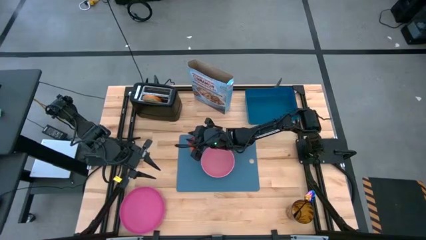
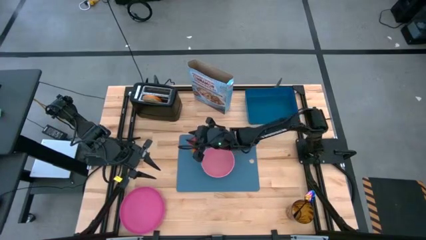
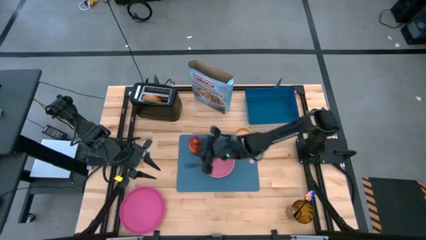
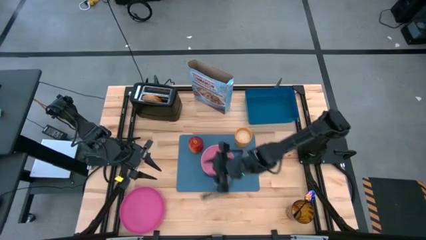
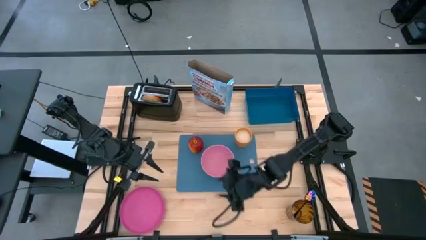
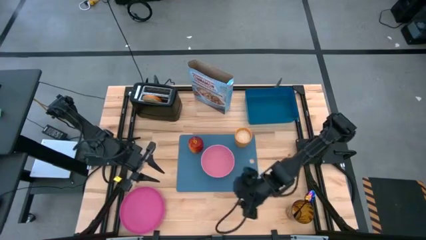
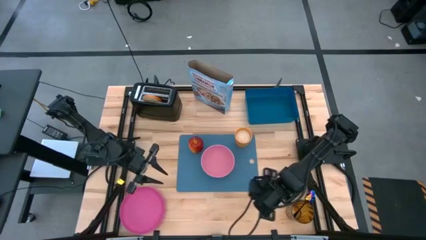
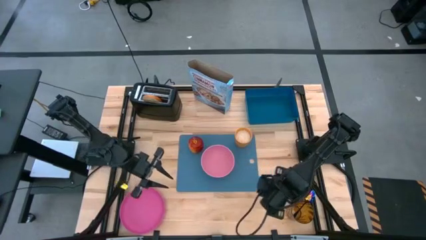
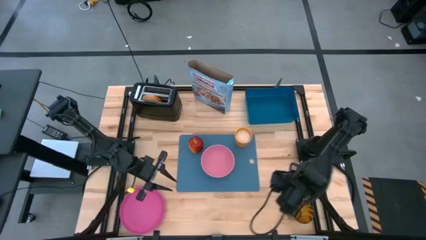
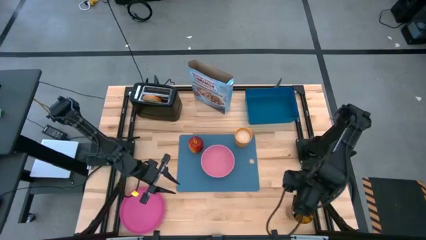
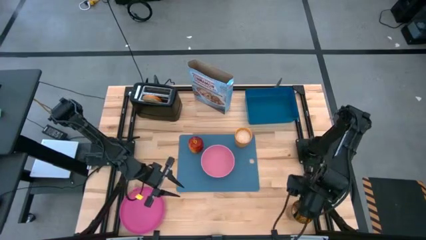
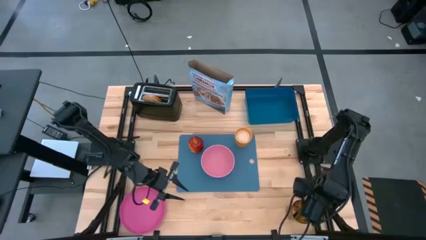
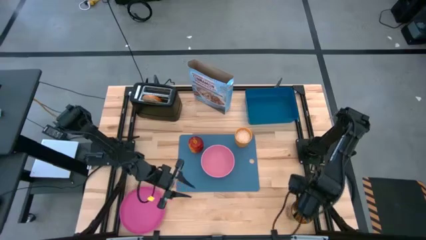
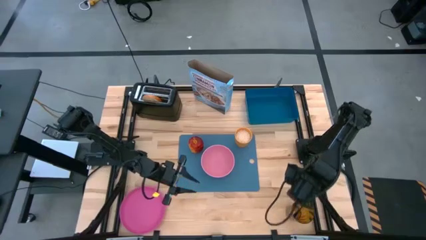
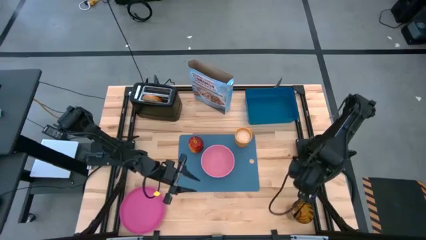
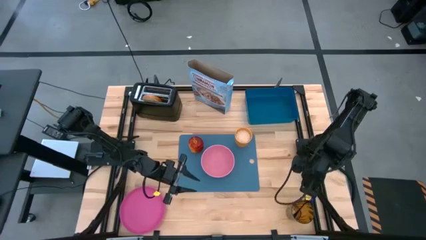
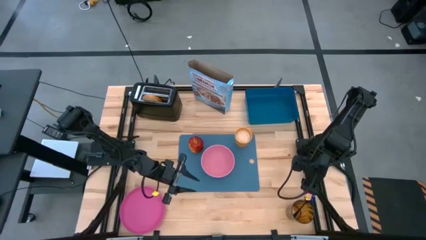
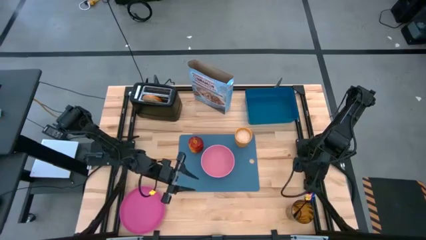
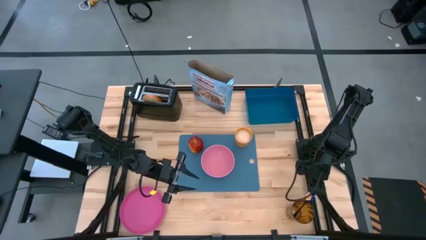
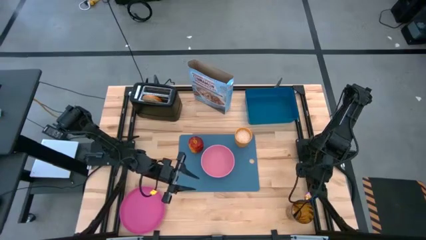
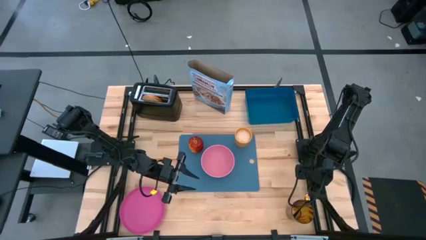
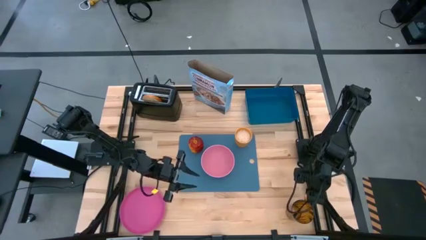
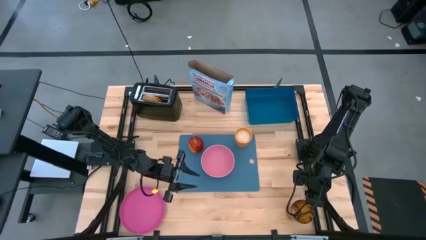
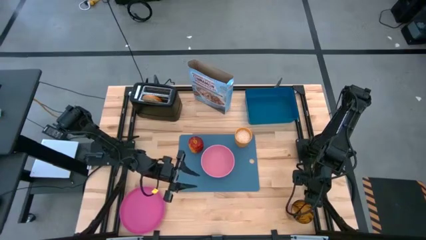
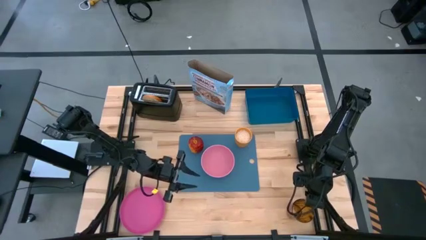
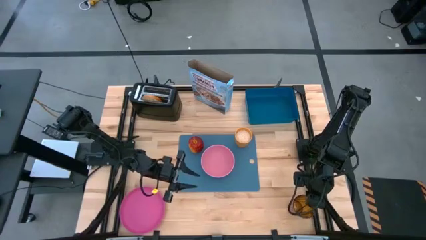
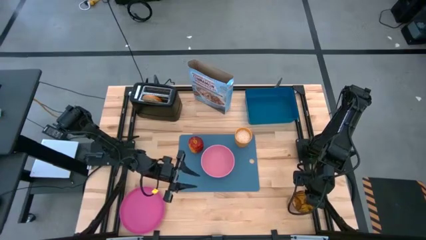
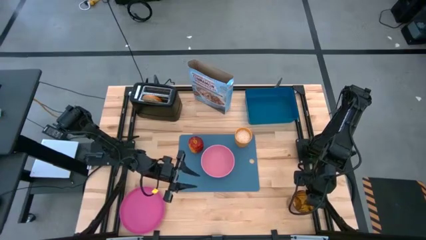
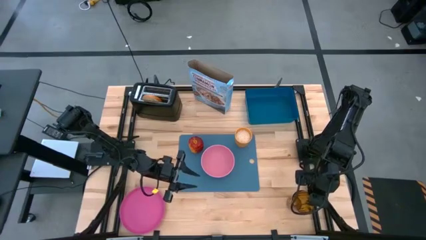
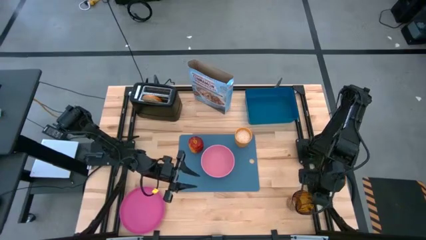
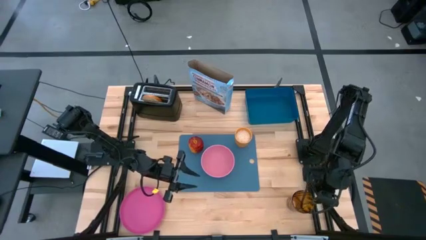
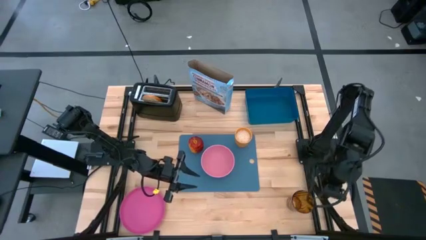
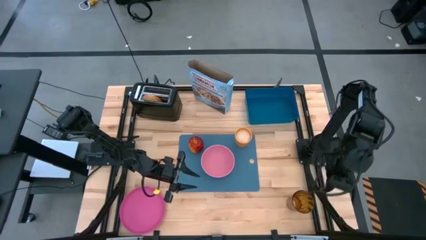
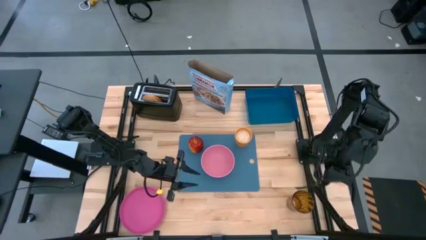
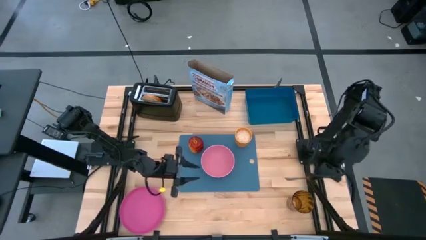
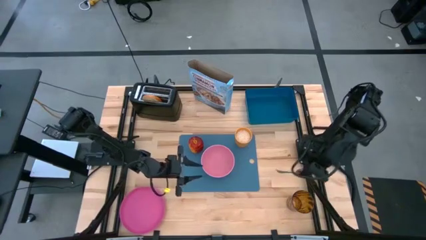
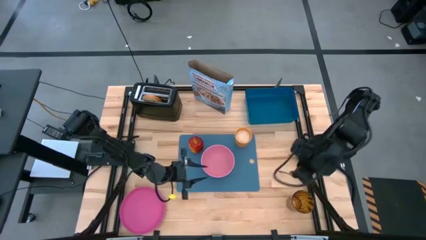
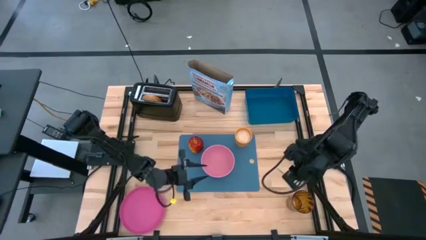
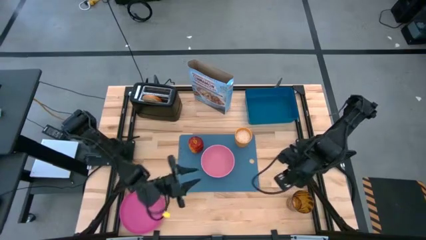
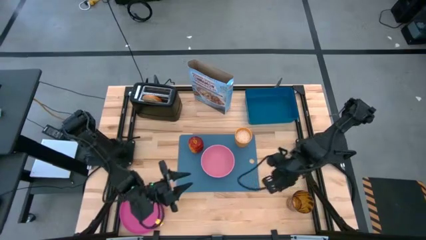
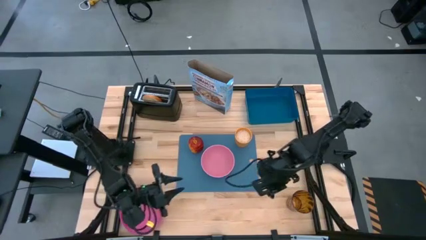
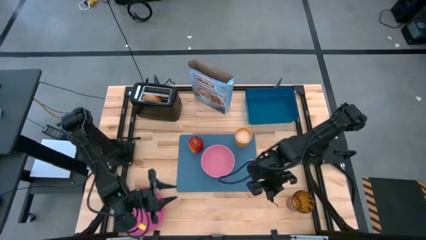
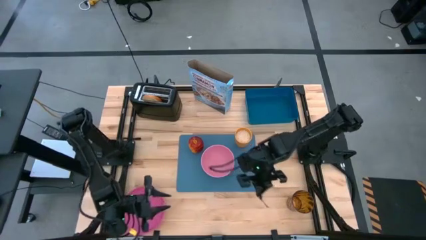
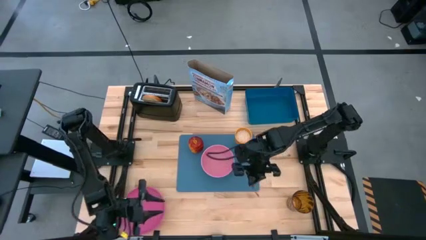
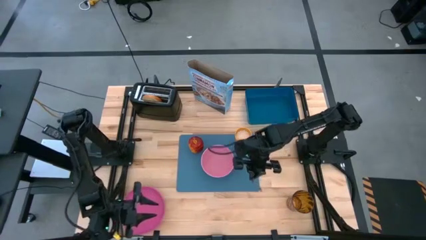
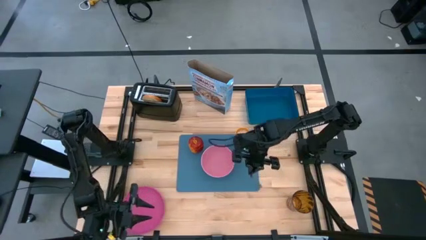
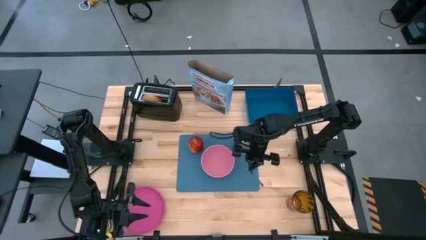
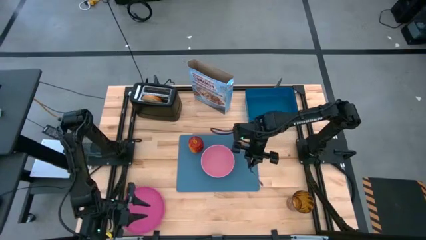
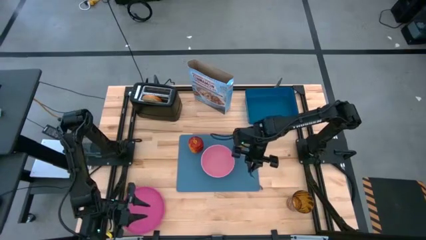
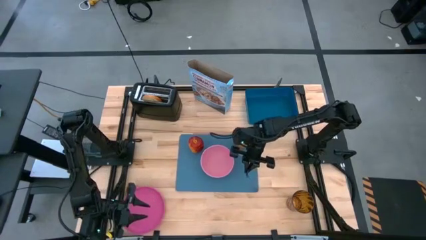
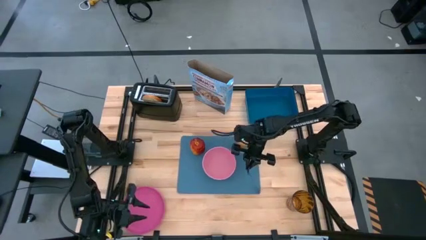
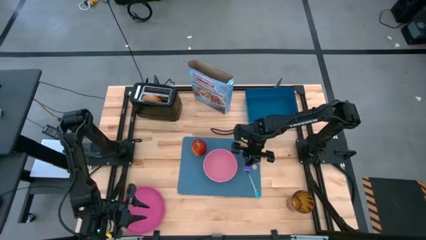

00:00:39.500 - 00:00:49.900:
Task: Arrange a breakfast setting
Put the violet tablespoon on the blue cutting board to the right of the pink bowl

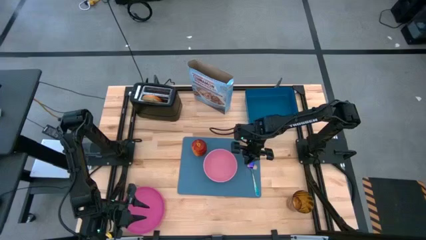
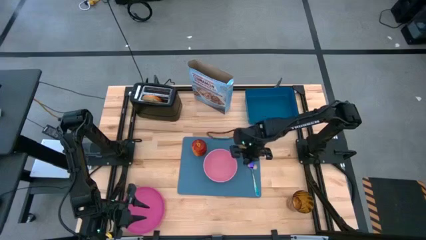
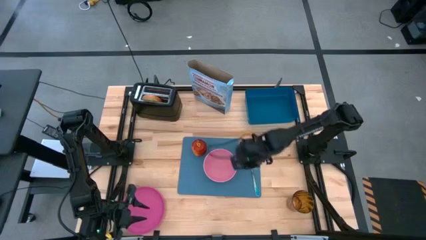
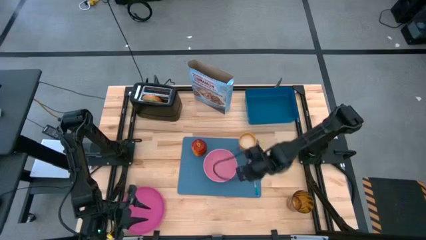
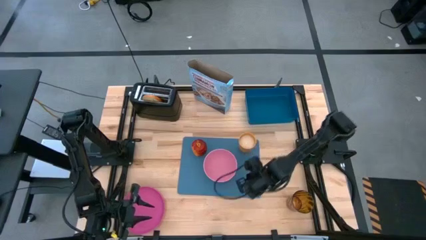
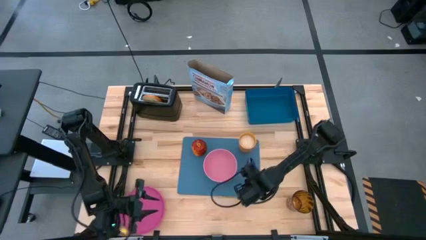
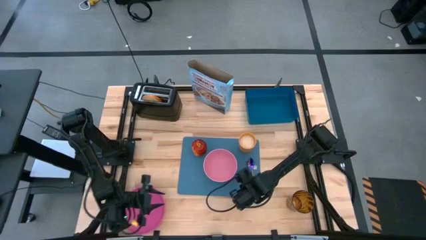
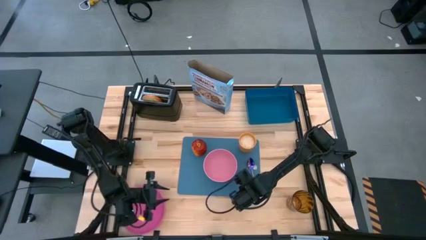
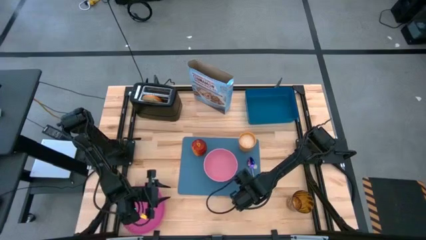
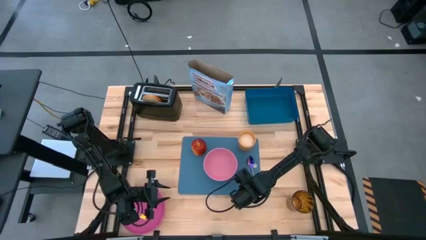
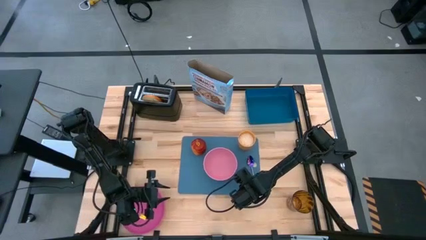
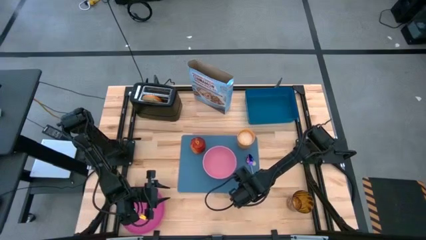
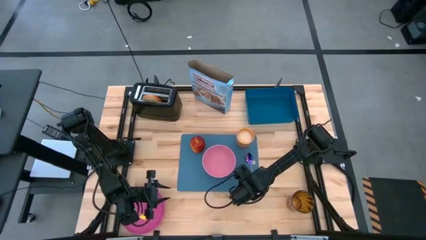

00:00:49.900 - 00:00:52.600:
Adjust the blue cutting board on the table

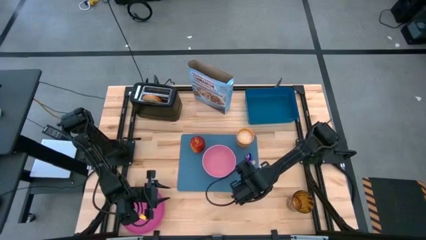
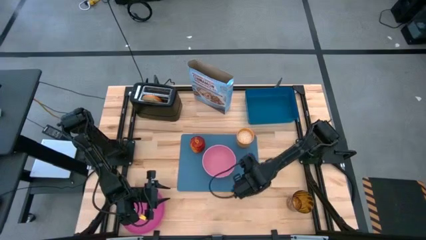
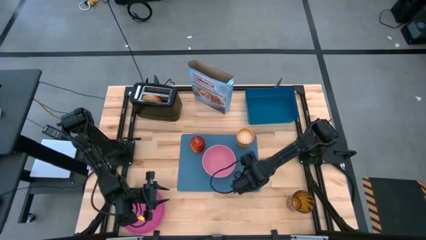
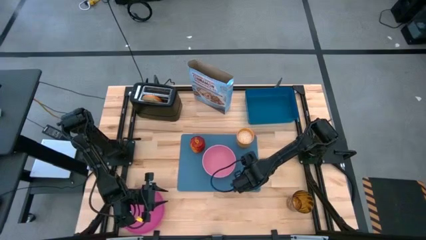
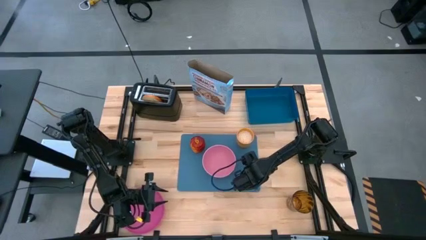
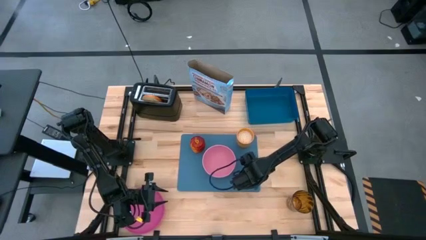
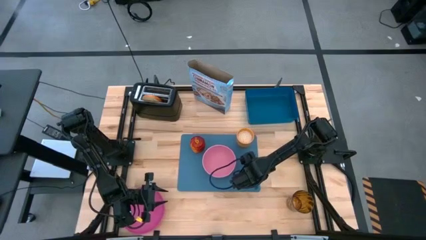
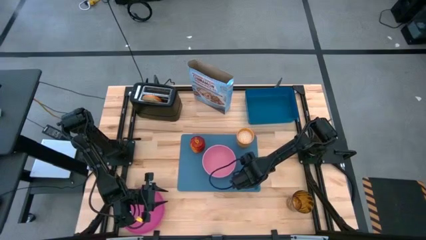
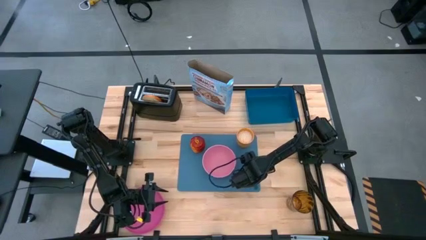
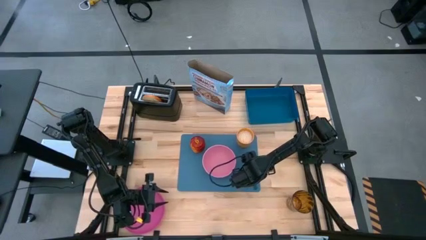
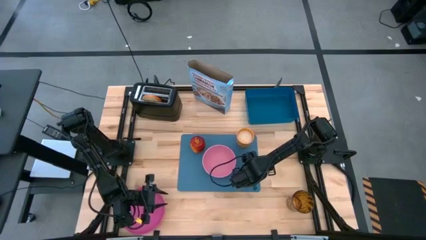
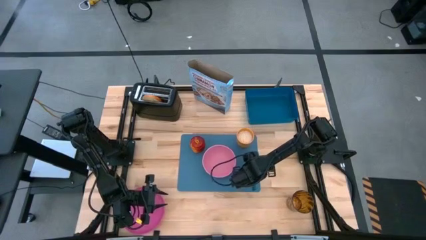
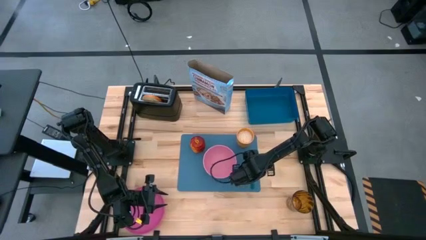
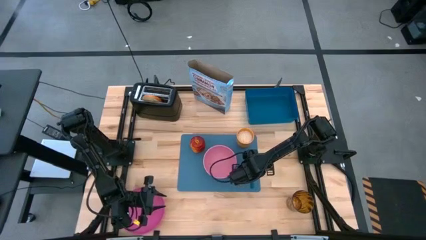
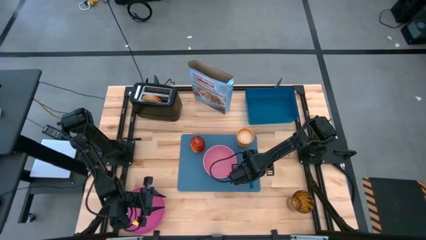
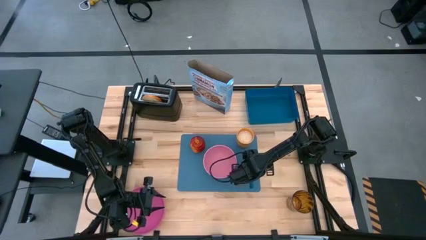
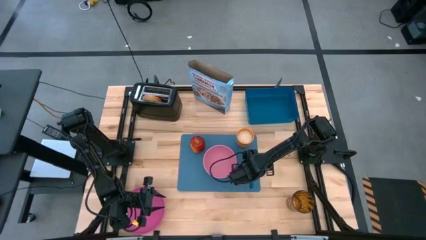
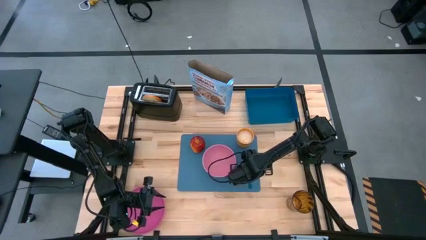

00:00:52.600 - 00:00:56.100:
Adjust the violet tablespoon on the blue cutting board

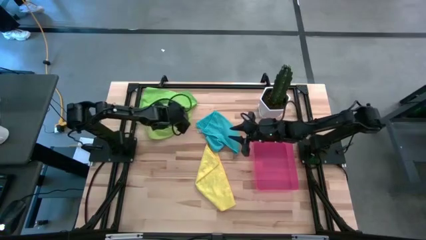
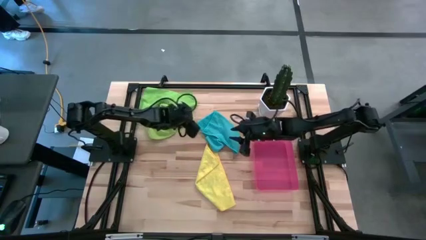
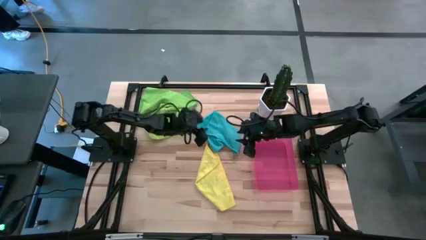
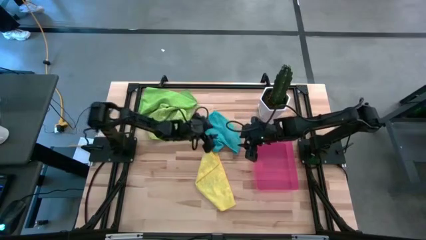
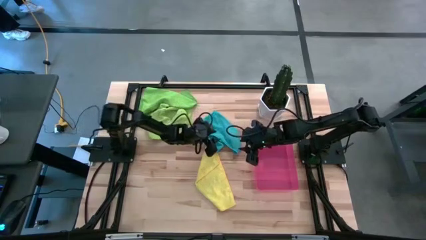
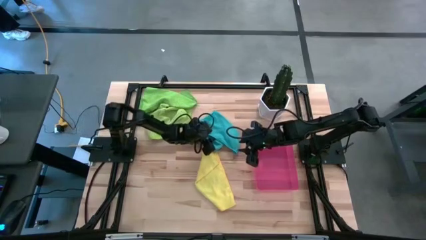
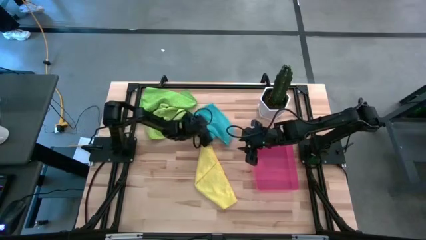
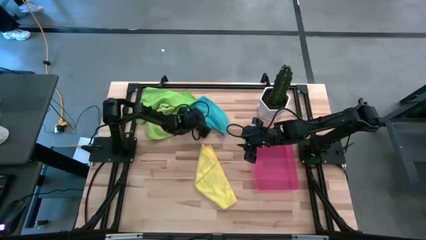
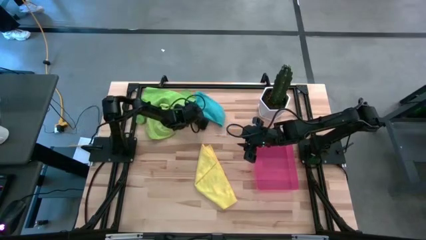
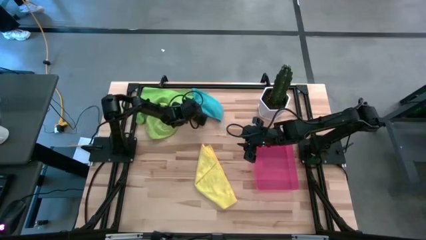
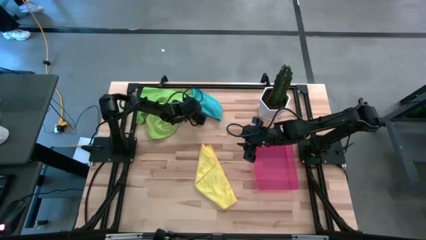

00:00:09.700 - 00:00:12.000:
Task: Roll microfiber towels into tight, uniform cylinder then place into a basket
Move the blue microfiber towel to the top
